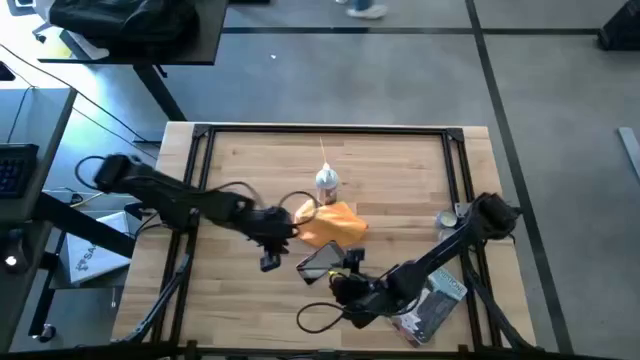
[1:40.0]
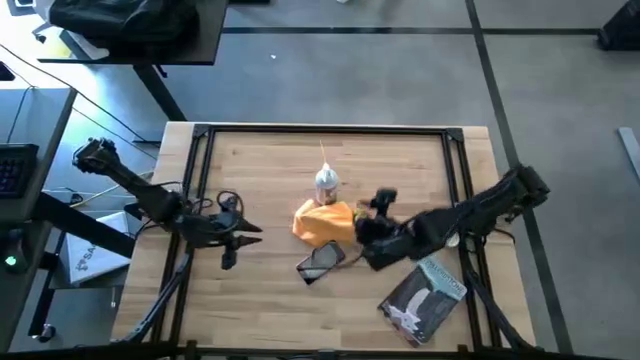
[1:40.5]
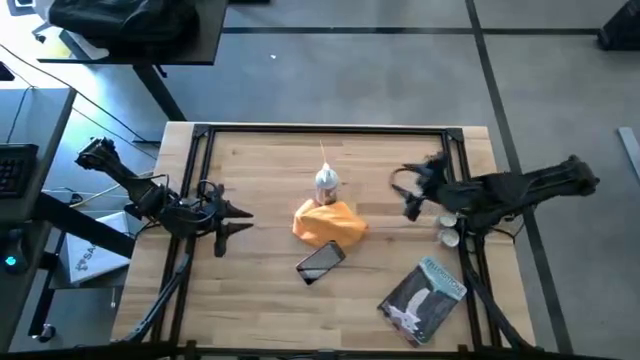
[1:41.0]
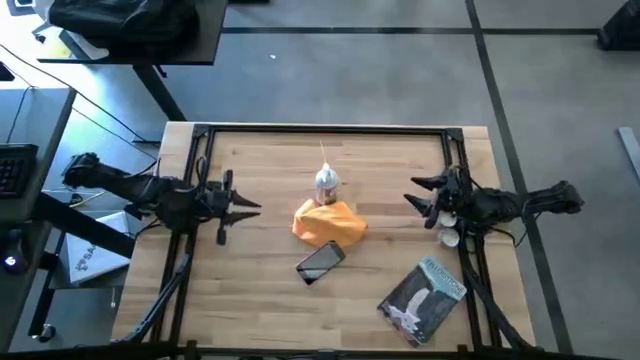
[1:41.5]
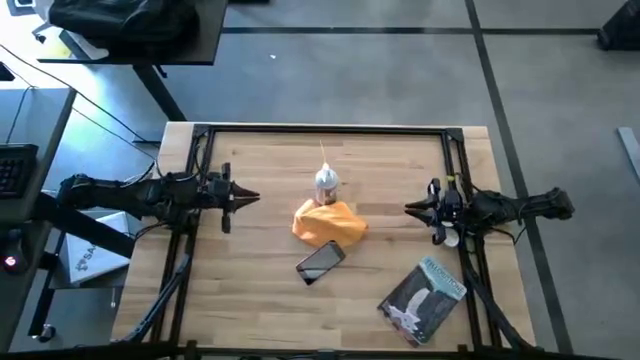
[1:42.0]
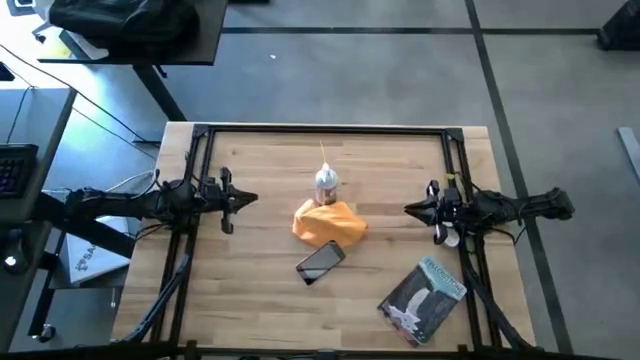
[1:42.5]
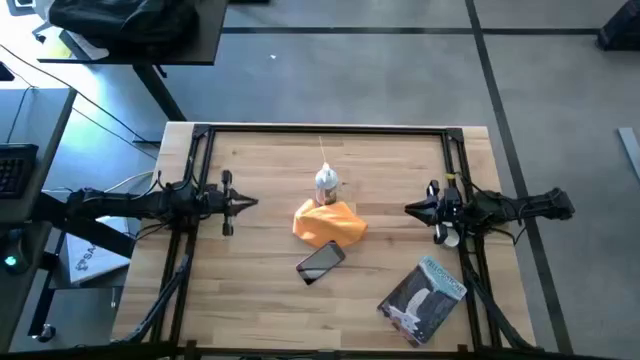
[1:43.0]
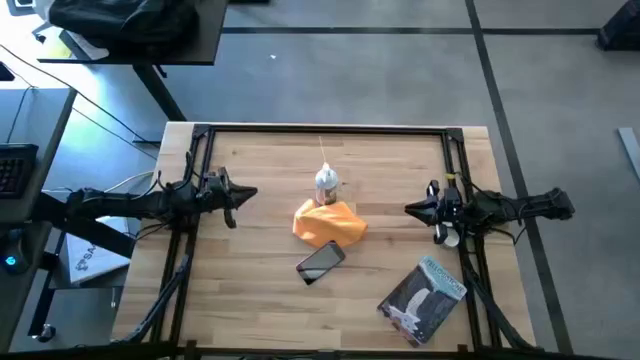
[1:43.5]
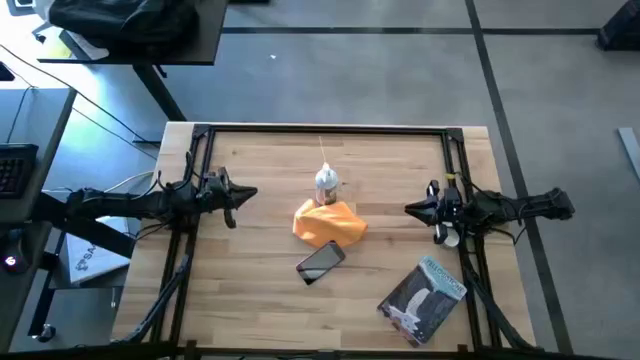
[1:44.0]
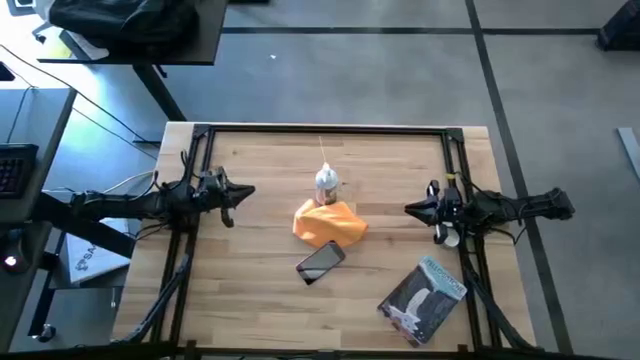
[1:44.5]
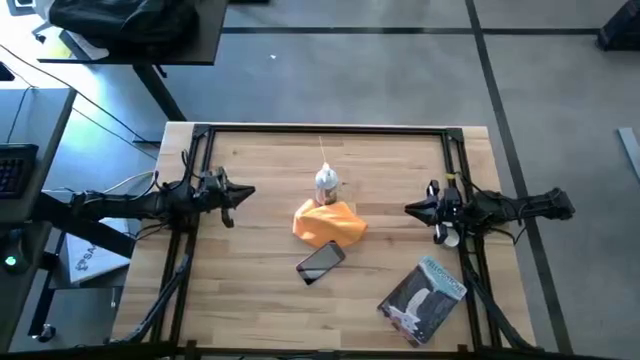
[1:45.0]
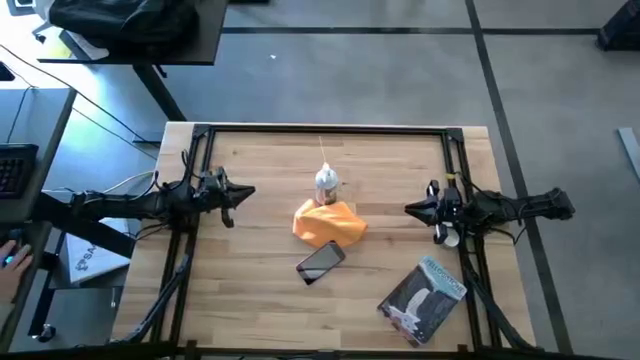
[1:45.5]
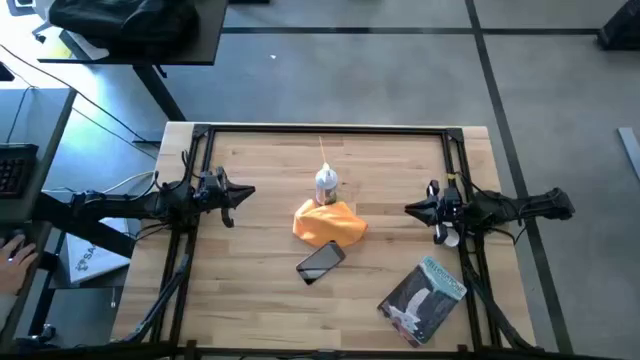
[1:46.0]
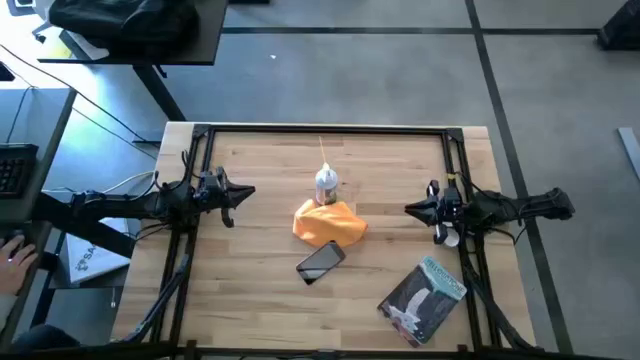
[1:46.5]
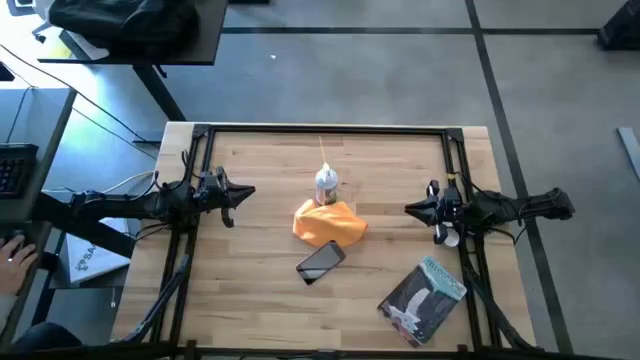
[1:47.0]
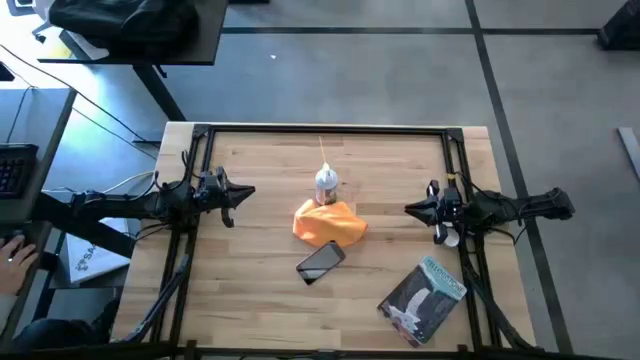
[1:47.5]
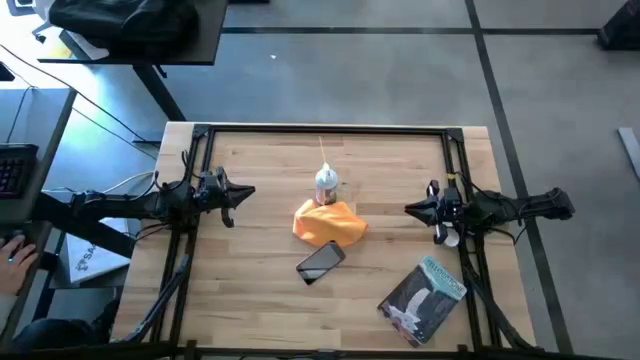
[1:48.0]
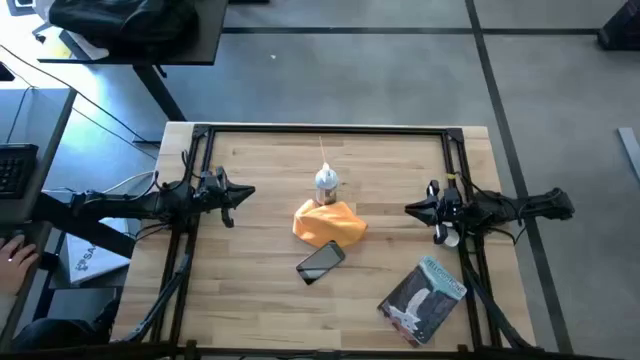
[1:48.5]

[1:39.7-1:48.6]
Task: Apply microfiber cloth
Return to Home Position

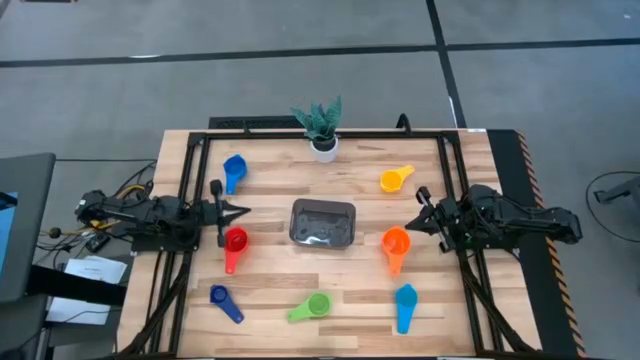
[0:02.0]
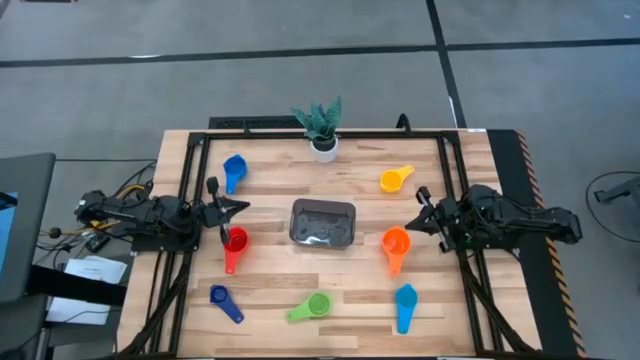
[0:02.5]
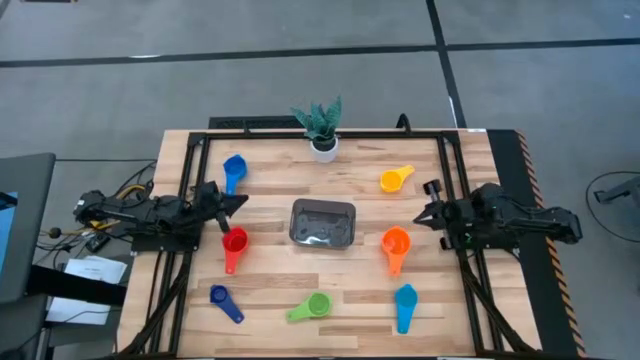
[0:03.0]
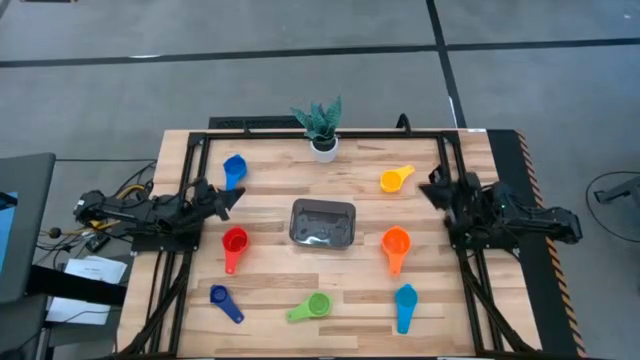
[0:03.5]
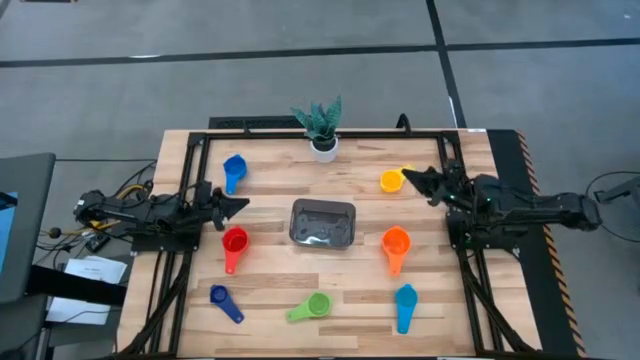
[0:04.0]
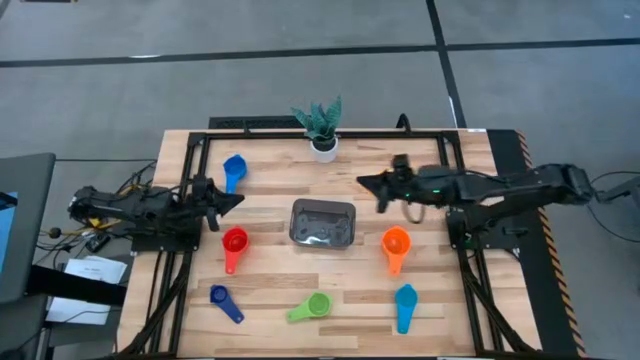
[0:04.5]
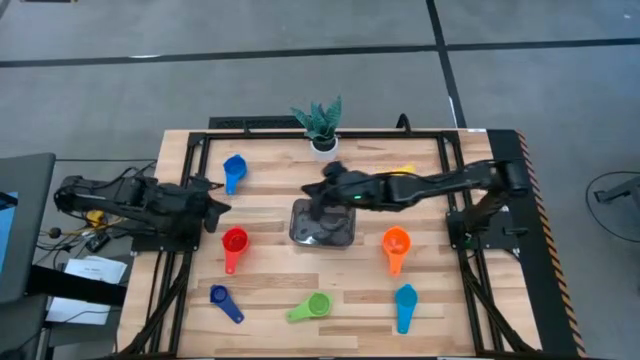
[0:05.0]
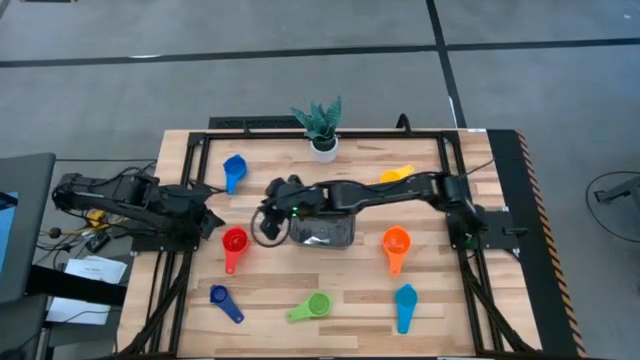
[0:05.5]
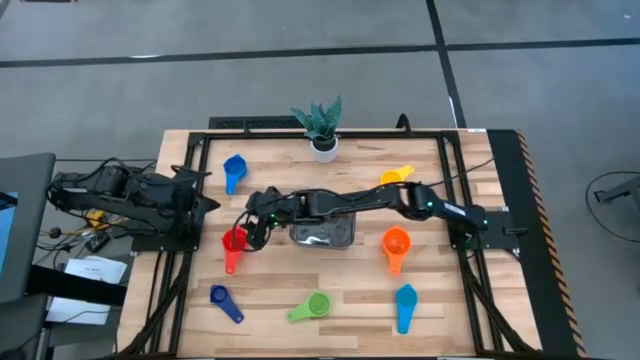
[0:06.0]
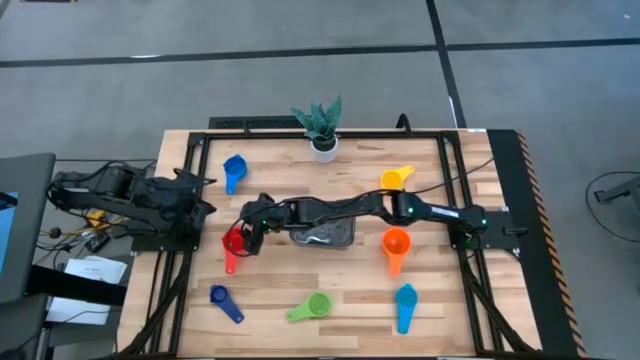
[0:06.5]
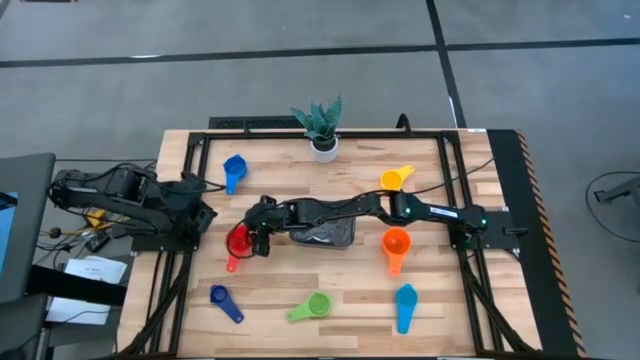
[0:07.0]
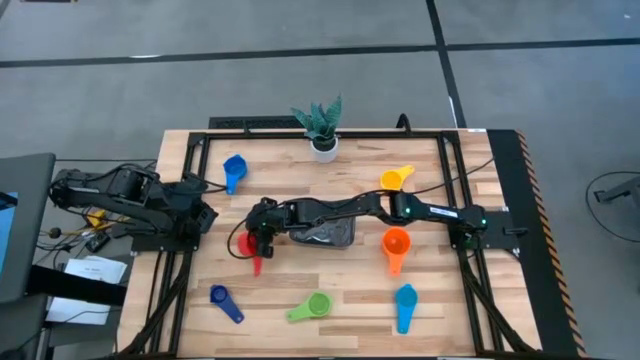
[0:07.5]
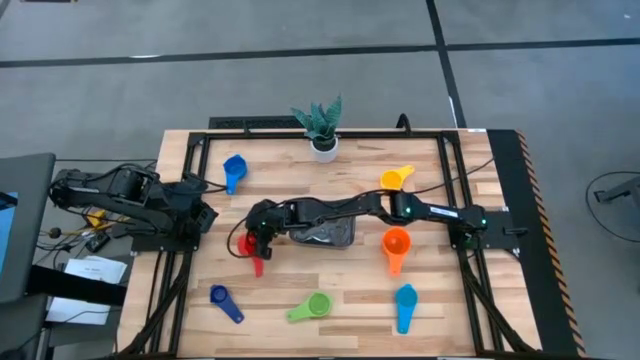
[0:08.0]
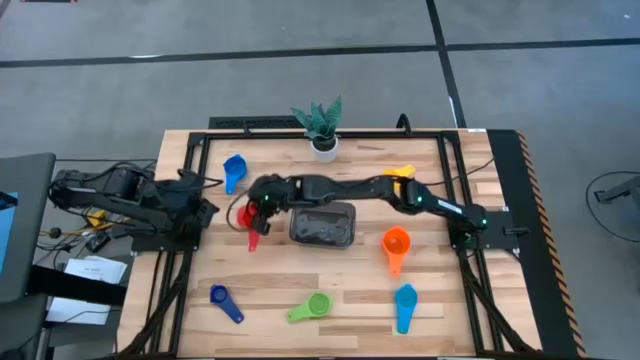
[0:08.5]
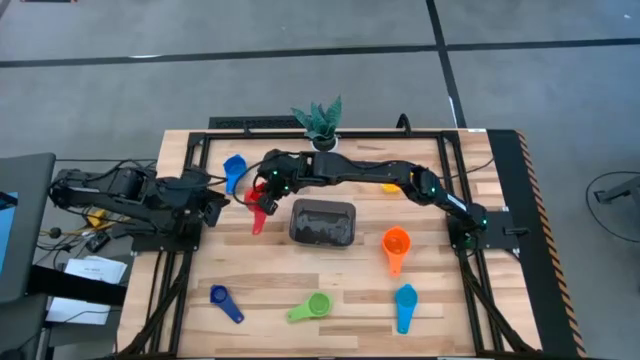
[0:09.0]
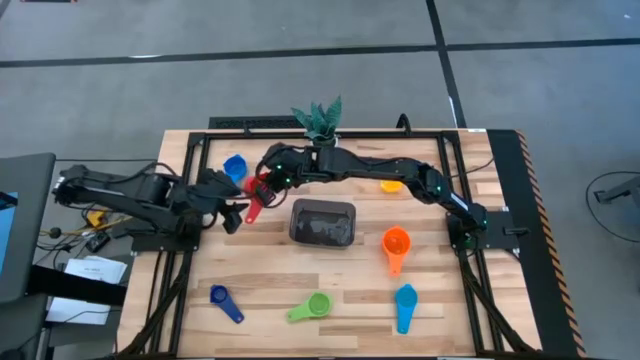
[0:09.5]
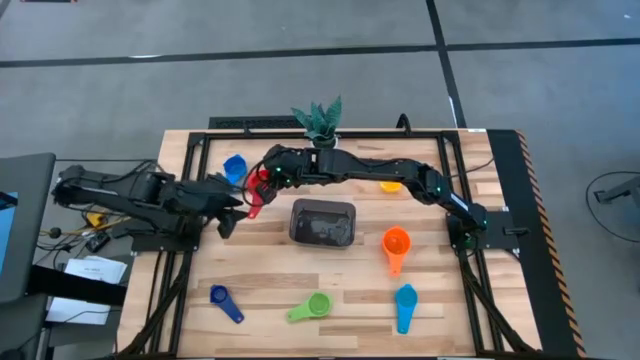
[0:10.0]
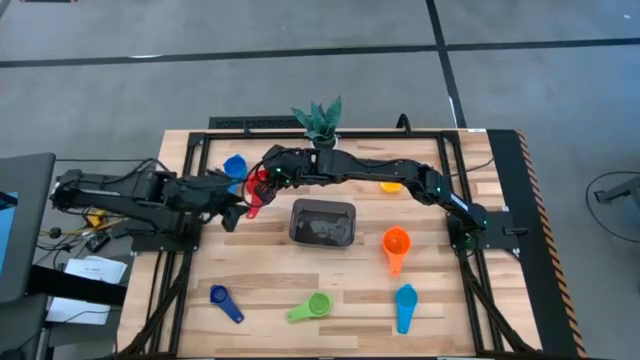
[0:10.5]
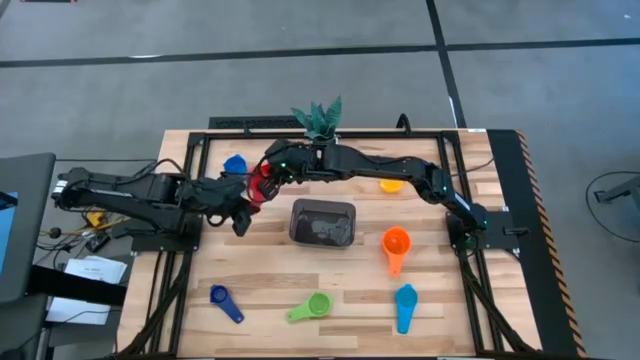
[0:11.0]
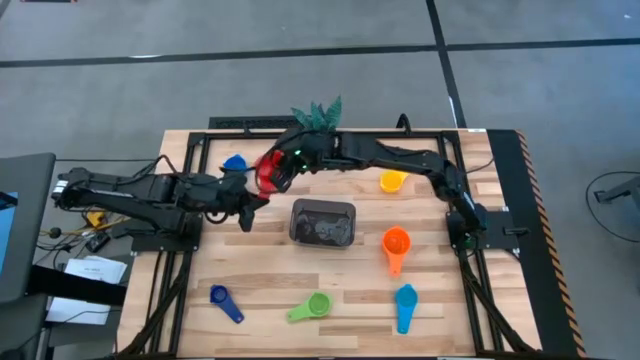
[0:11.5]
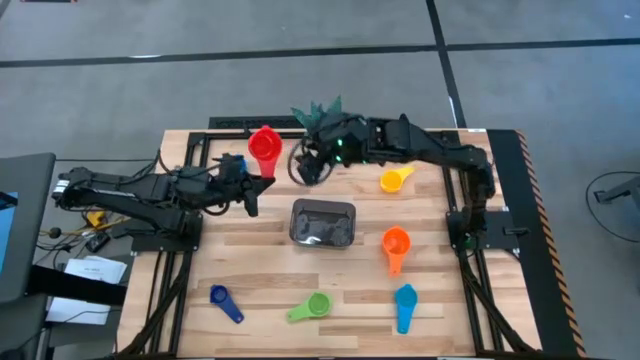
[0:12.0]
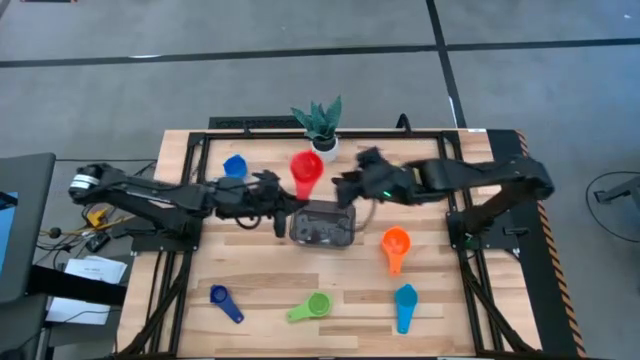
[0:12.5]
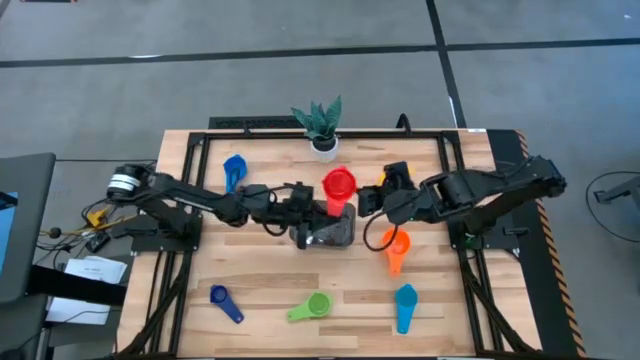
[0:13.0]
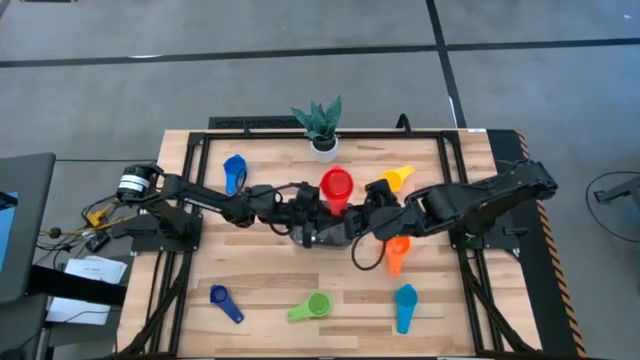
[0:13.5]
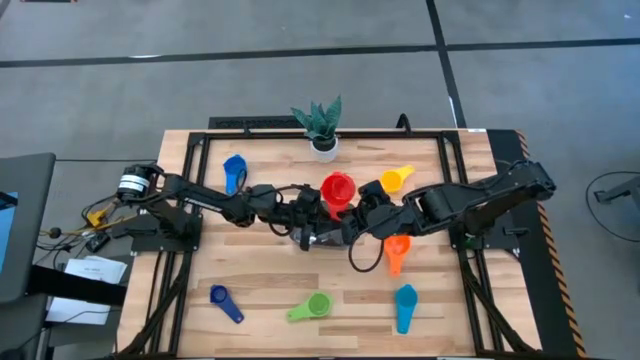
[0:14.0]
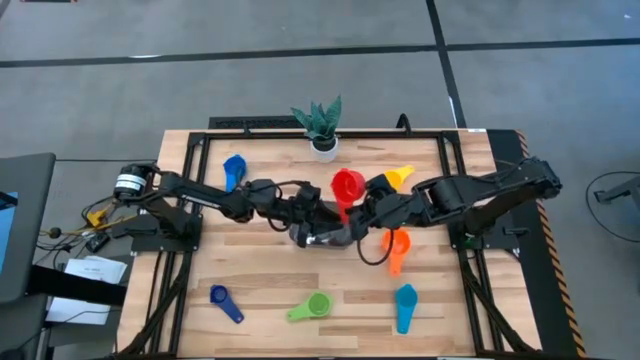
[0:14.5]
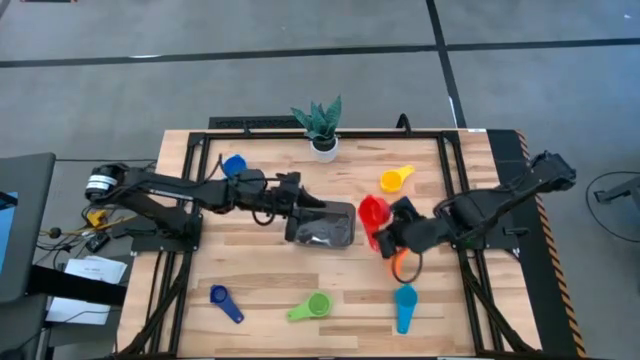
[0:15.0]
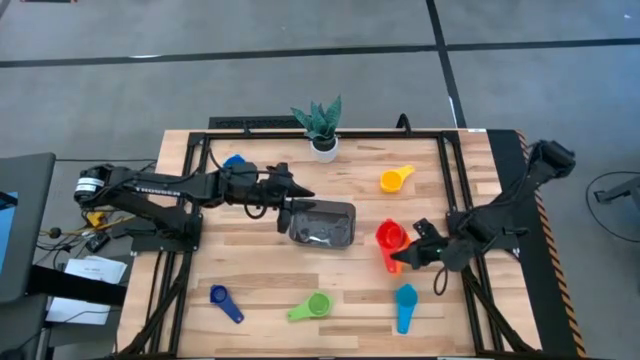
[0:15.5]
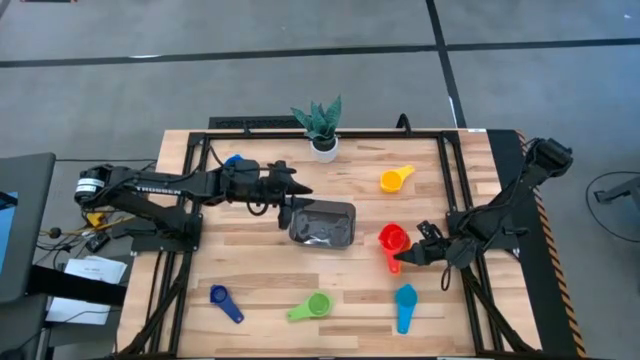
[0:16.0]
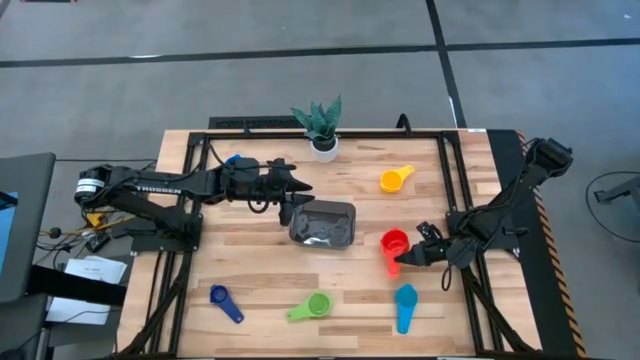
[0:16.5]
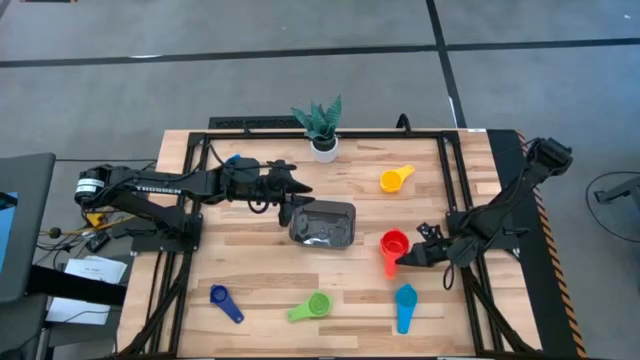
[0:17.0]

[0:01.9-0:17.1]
Task: Nest measuring cups in basket
Stack the red measuring cup on top of the orange measuring cup
